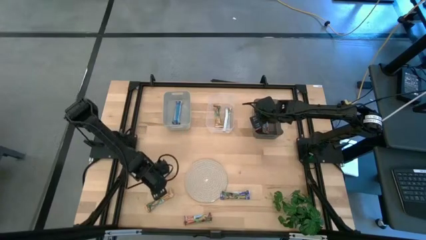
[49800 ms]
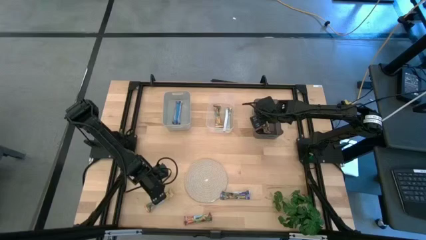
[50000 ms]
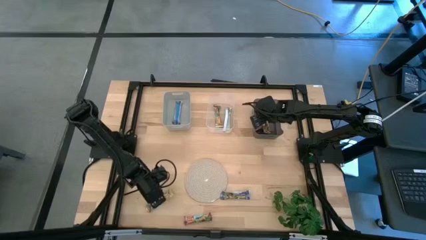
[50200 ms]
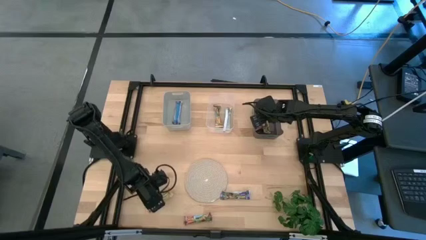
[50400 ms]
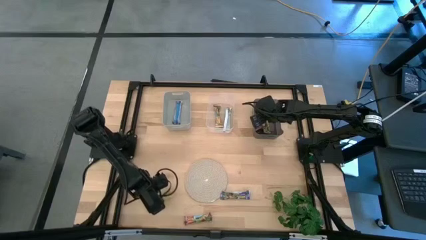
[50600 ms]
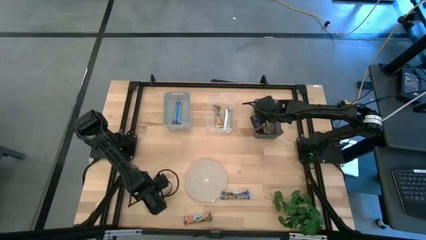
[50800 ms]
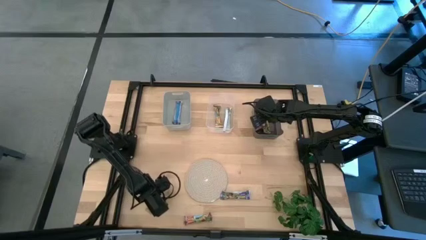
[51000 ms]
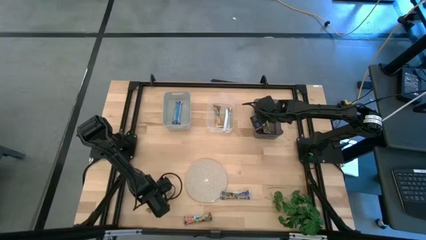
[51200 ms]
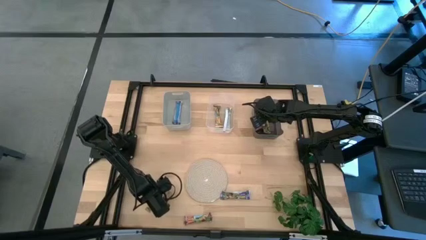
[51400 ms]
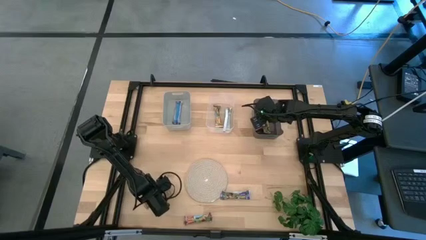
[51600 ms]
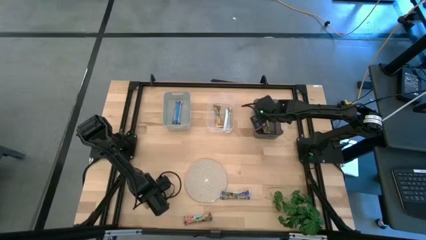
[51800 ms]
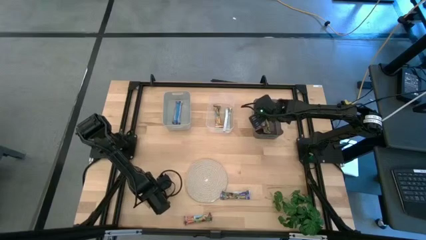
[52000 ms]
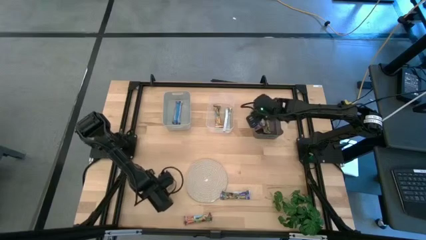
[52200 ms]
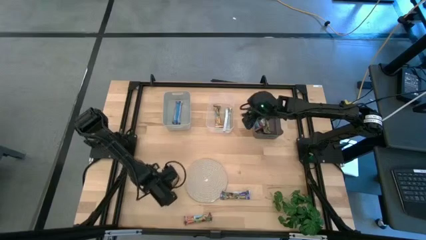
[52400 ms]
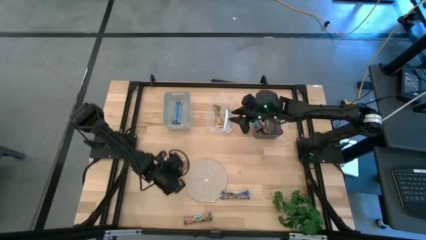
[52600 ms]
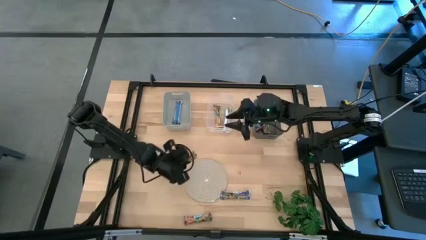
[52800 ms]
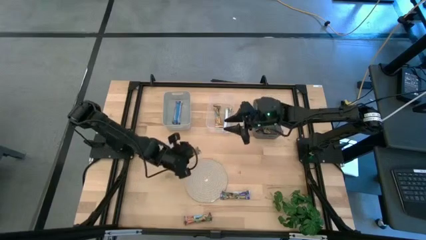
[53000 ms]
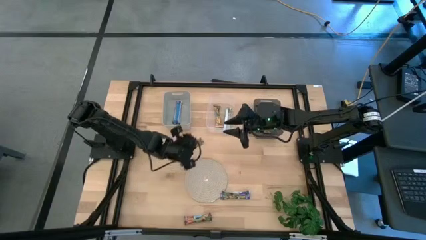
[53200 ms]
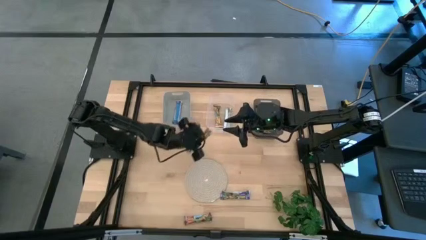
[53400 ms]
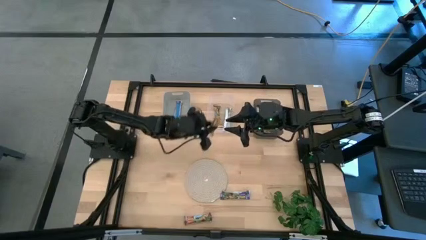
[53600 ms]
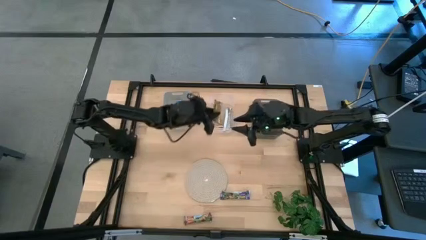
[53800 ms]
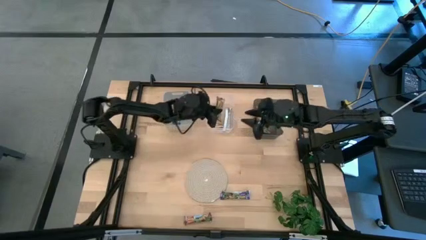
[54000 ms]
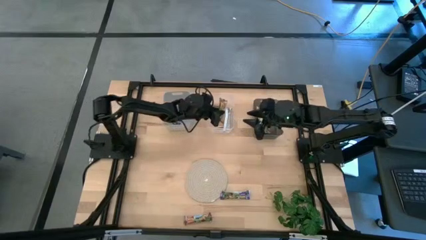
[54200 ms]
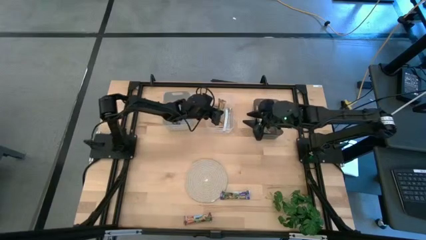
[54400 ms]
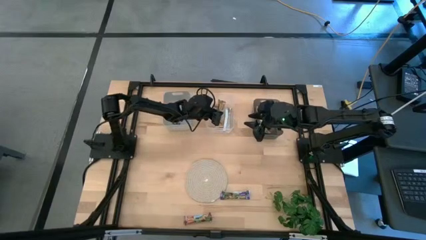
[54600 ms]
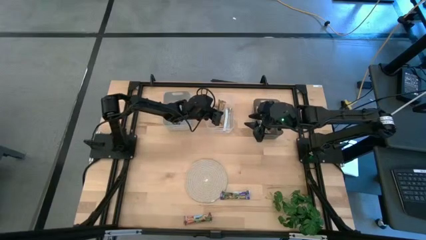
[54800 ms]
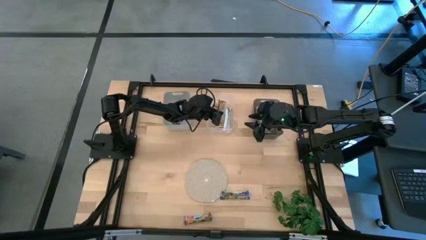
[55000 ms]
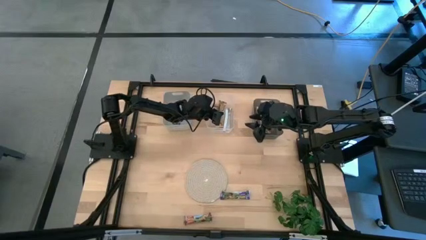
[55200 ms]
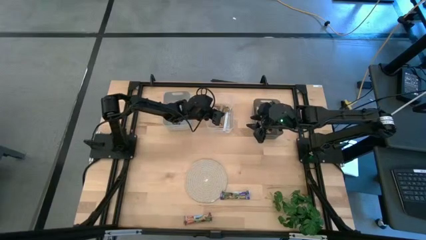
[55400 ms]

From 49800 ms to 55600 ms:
Task: Pick and place Granola Bars by type
Put the yellow granola bar into the transparent bin

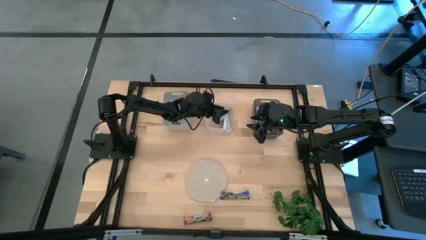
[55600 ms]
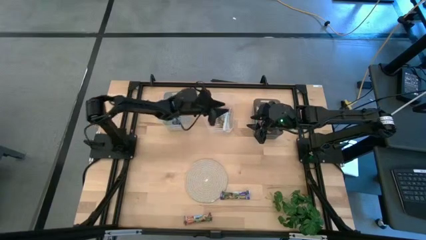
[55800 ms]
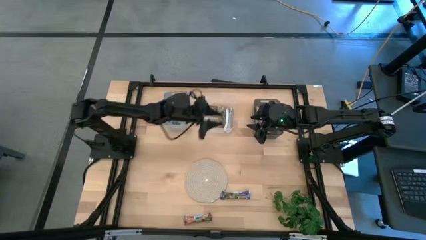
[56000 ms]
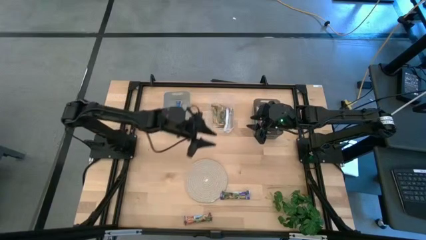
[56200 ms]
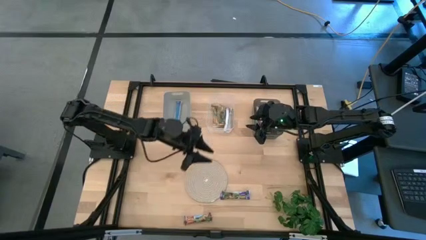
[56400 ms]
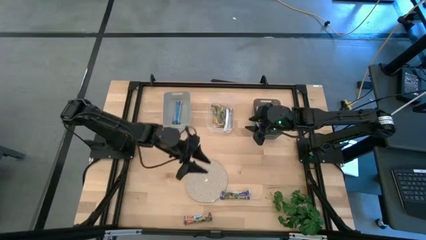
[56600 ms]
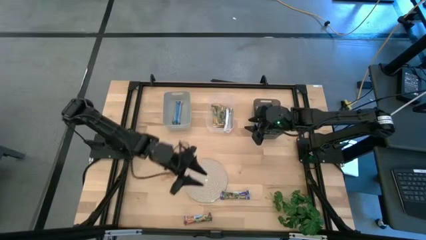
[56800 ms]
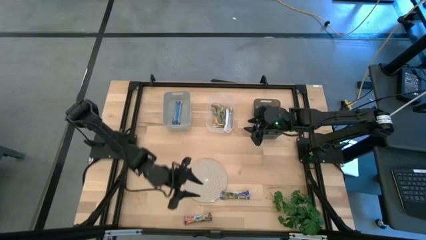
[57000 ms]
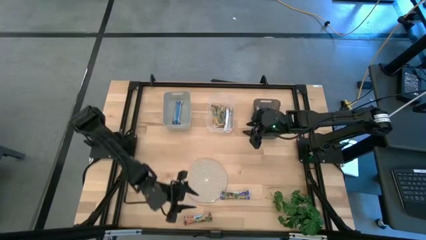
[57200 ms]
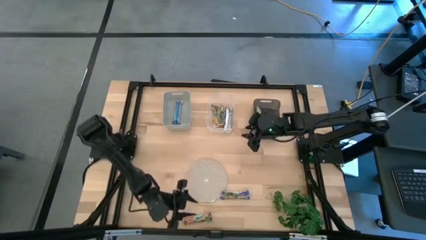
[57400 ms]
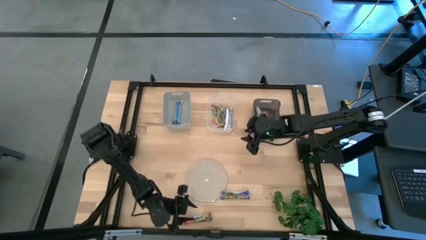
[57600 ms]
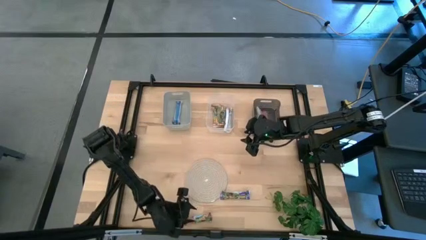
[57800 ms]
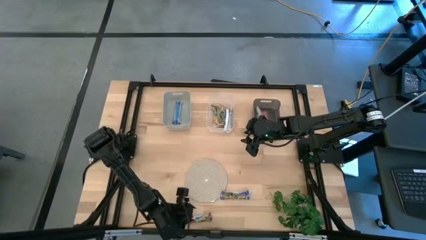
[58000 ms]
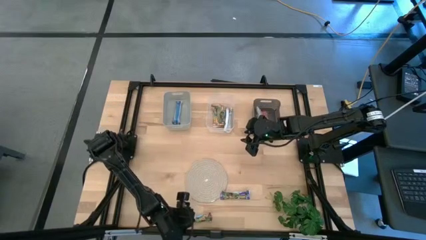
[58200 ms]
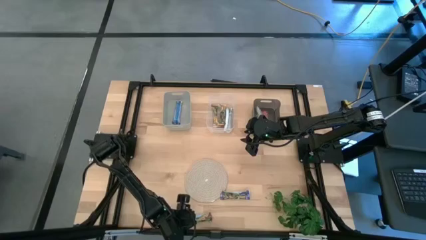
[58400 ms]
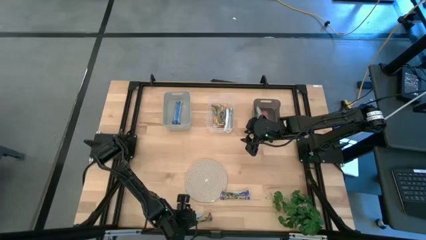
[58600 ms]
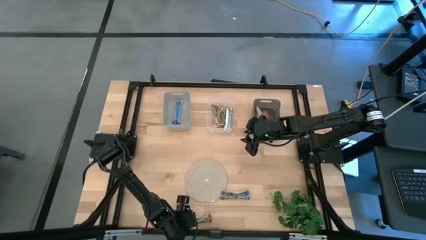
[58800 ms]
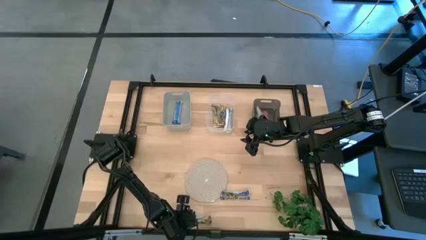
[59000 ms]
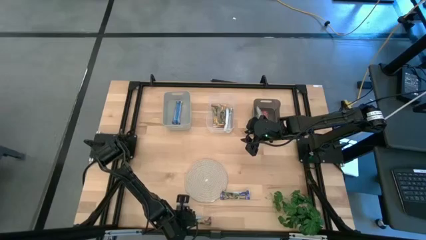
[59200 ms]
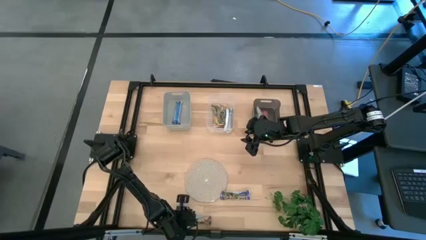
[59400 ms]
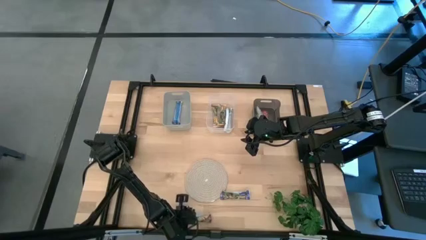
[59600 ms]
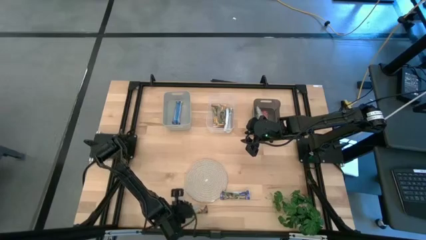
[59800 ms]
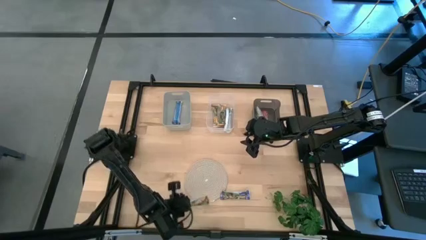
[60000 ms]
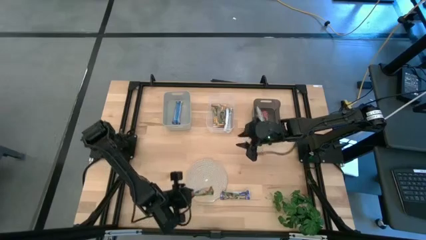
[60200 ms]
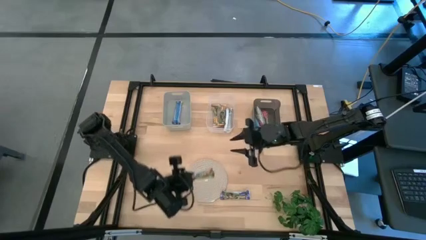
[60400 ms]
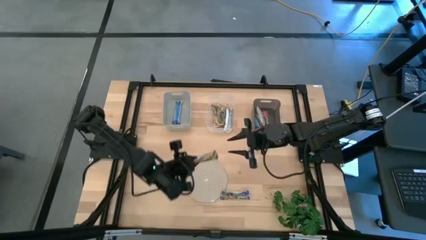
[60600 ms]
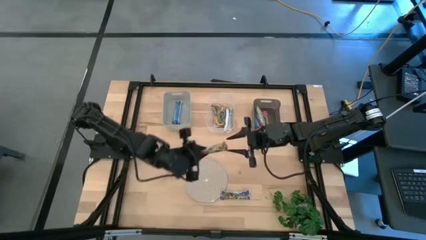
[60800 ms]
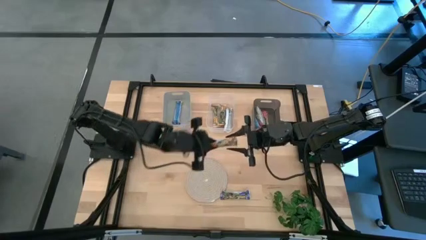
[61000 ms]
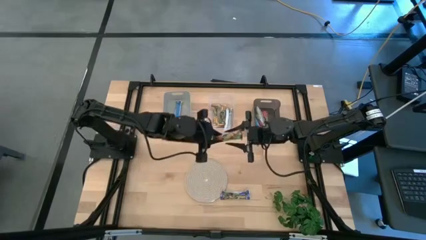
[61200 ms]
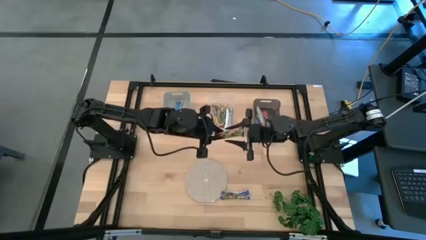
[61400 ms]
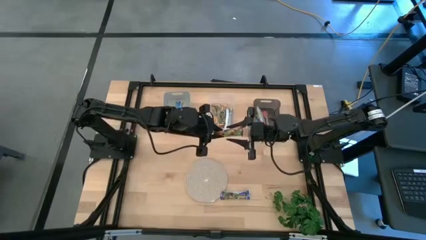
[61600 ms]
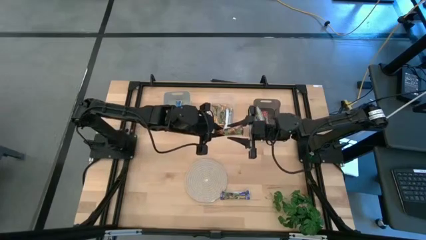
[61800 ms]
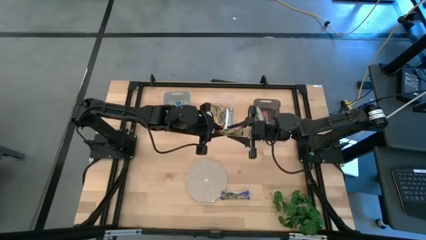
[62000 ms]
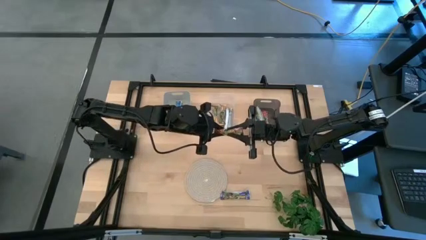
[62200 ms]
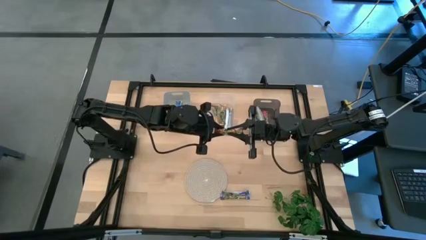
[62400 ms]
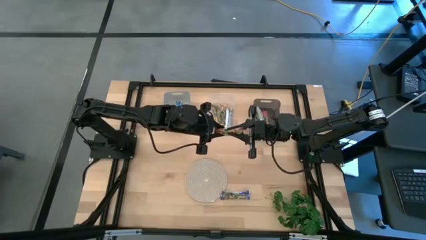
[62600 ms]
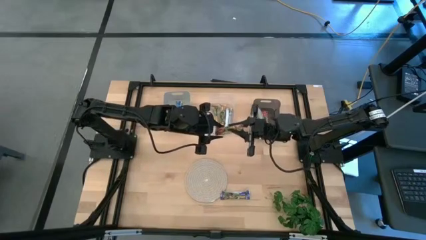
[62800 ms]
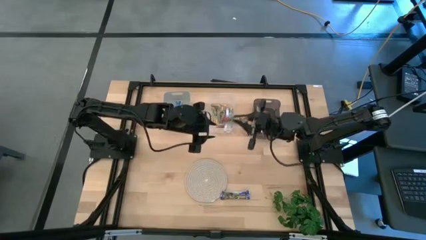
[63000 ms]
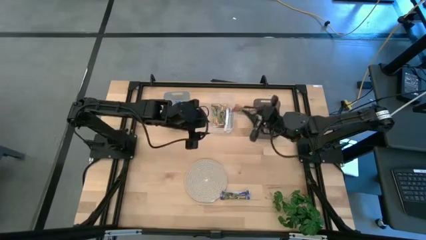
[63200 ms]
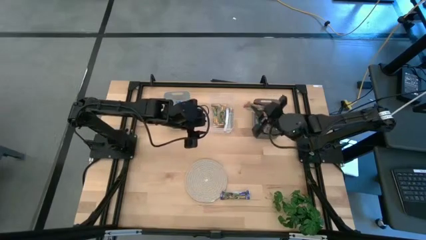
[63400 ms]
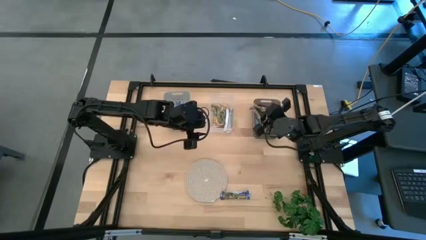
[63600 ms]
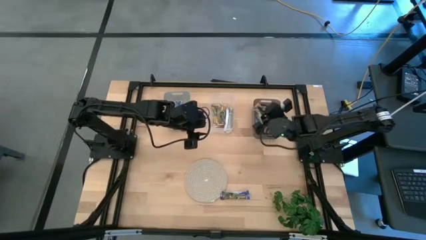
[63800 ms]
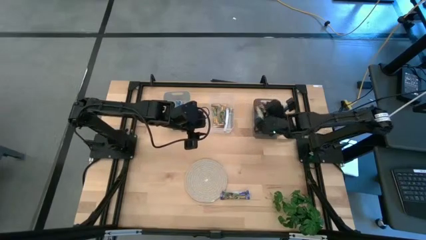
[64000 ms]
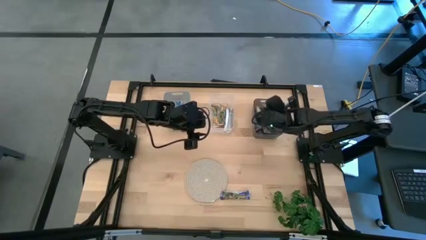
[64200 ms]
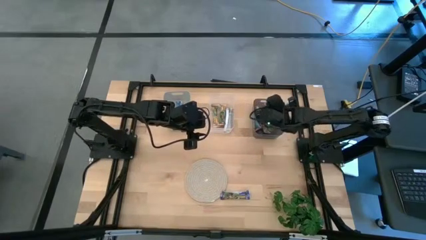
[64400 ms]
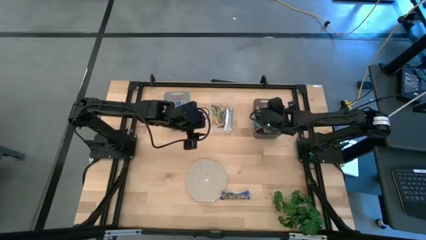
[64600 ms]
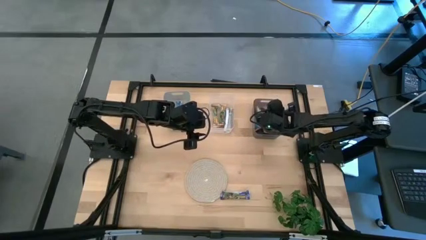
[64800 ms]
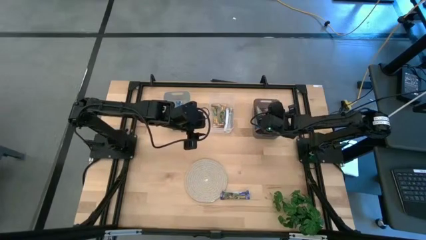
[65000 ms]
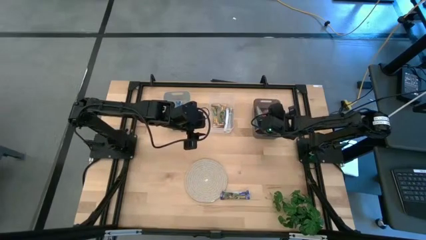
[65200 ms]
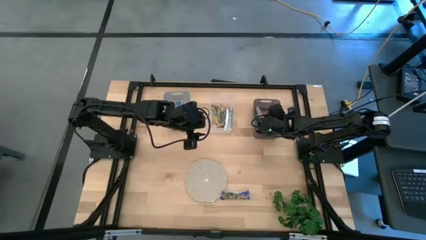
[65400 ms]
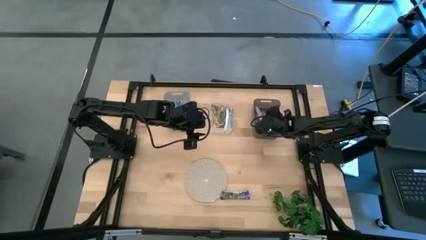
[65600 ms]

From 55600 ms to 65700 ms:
Put the red granola bar into the black bin

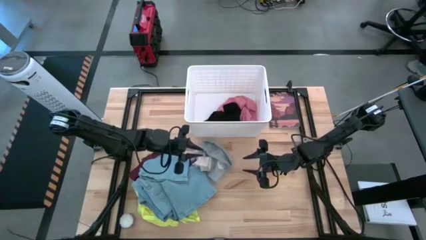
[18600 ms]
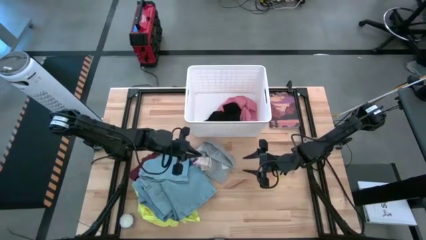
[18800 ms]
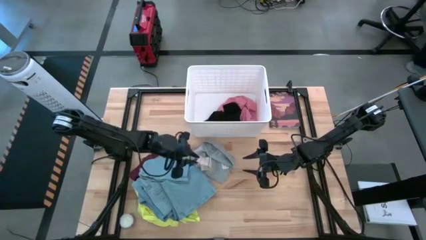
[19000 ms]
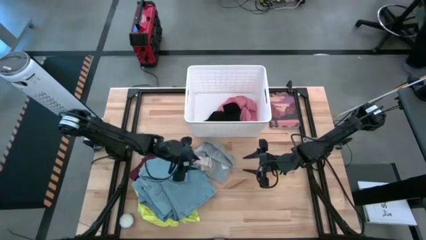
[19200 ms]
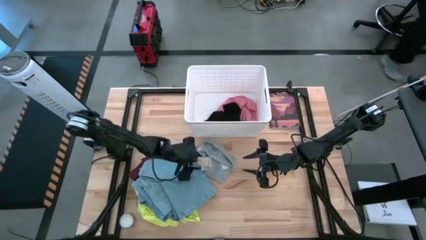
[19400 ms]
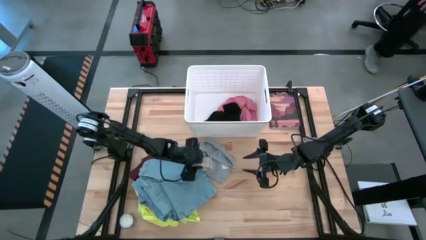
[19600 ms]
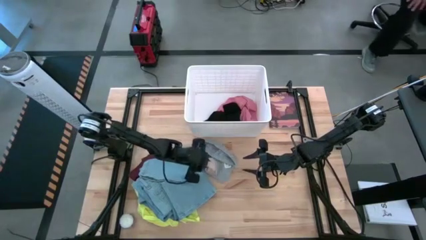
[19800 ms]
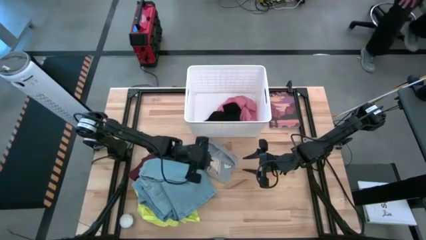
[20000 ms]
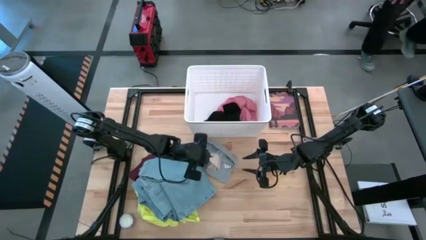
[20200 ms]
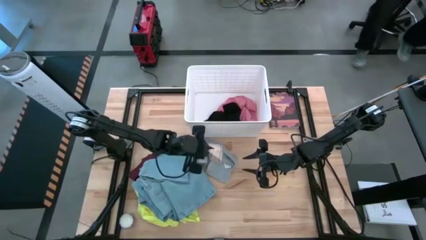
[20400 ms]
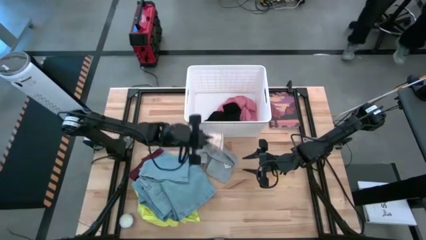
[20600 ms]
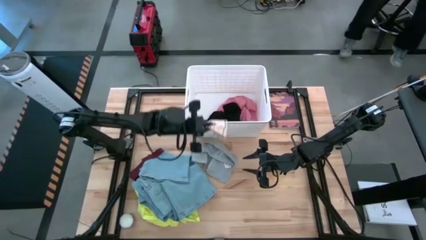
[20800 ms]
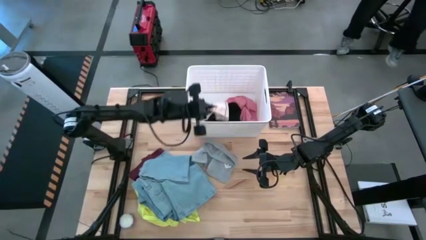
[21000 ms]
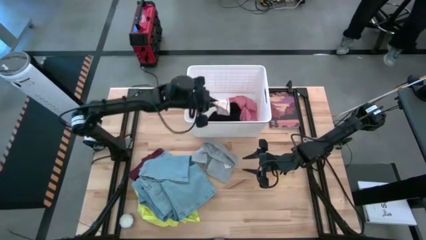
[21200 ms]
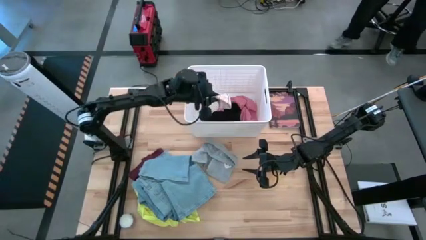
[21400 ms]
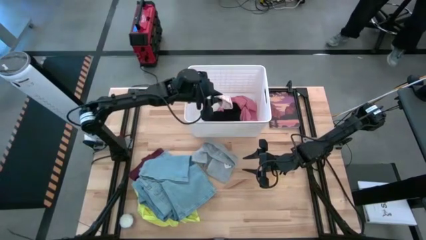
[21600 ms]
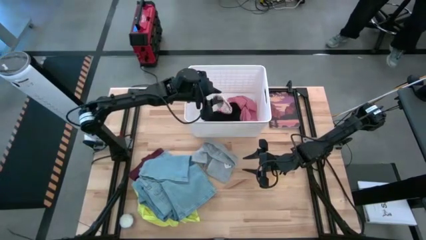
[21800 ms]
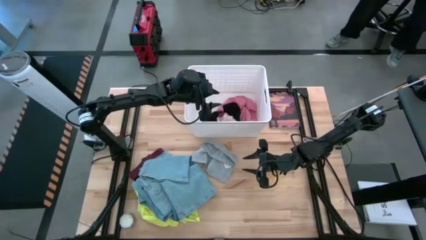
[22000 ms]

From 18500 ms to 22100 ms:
Task: Sort clothes
Put the gray sock into the white laundry bin
